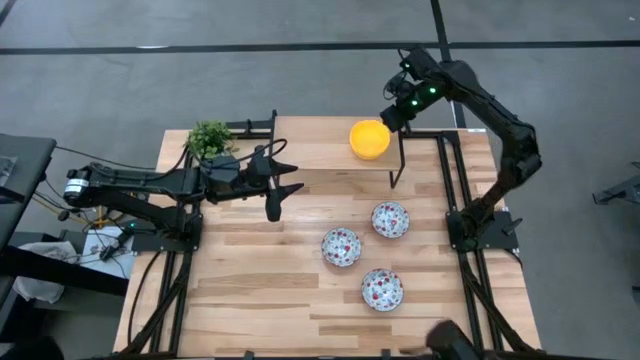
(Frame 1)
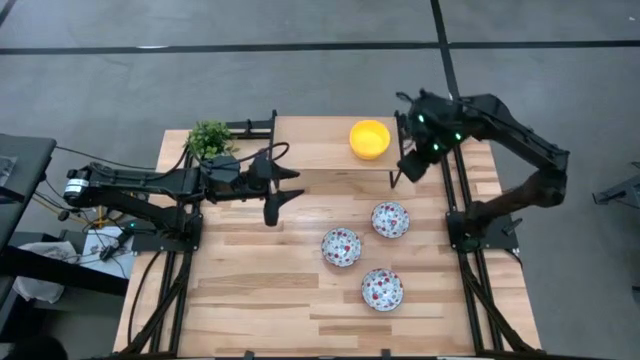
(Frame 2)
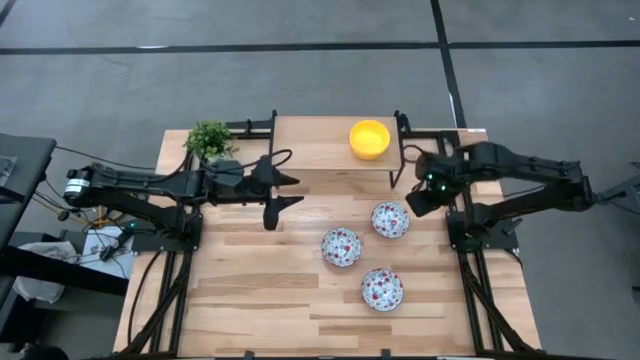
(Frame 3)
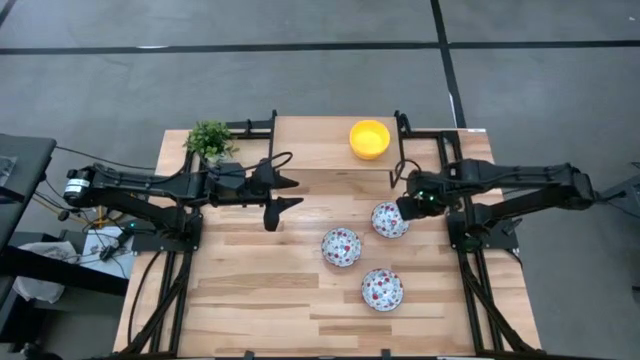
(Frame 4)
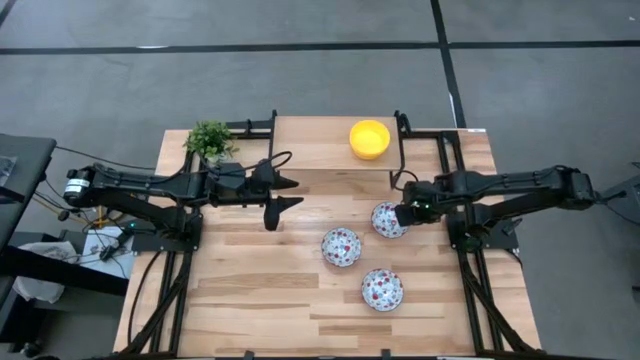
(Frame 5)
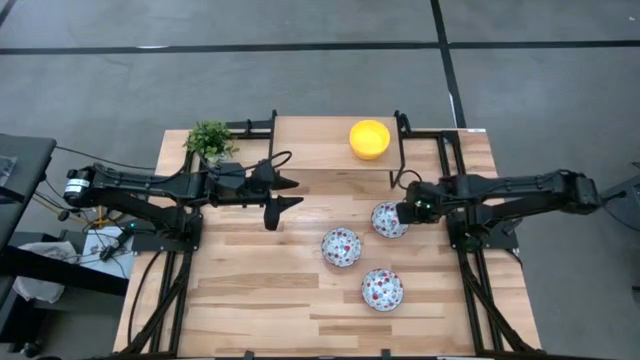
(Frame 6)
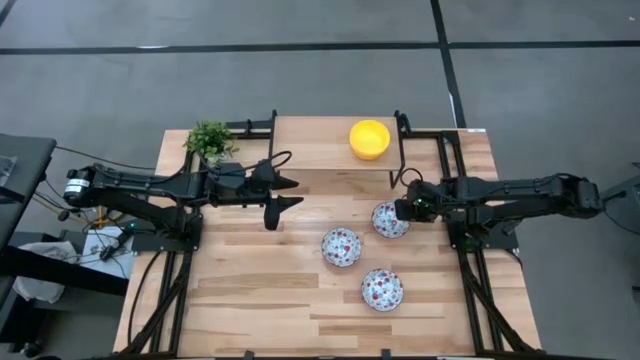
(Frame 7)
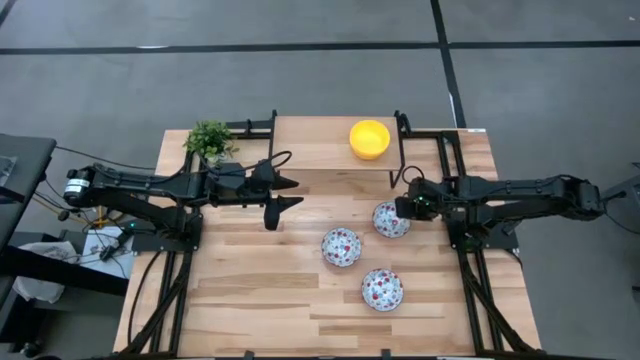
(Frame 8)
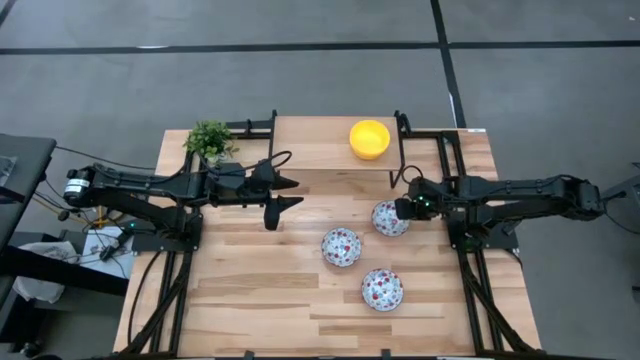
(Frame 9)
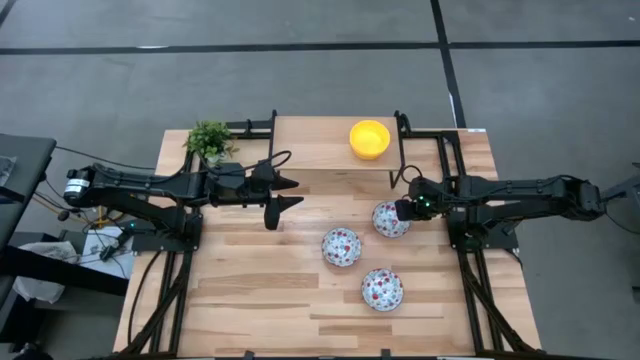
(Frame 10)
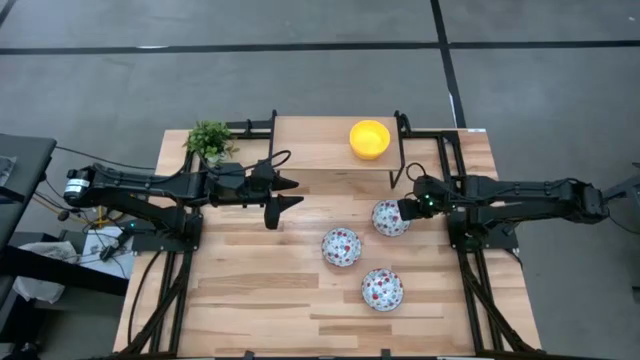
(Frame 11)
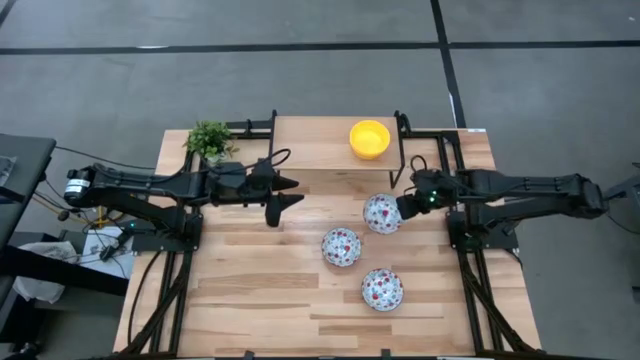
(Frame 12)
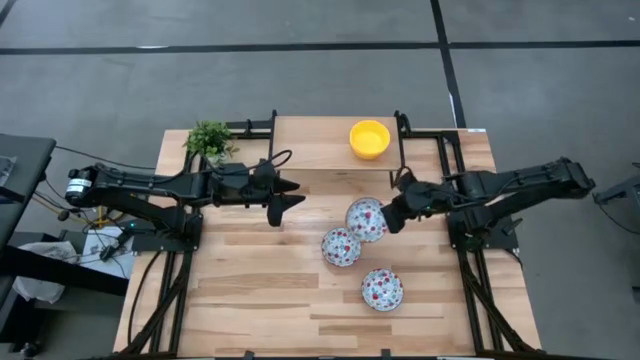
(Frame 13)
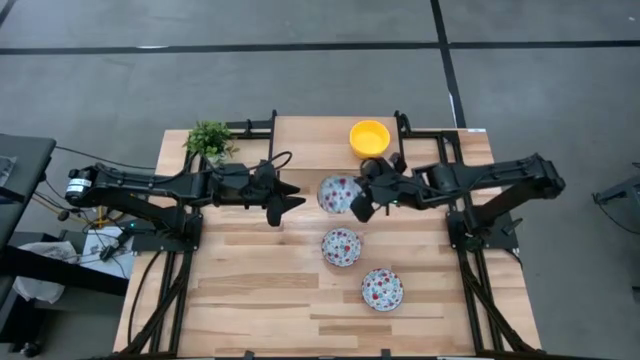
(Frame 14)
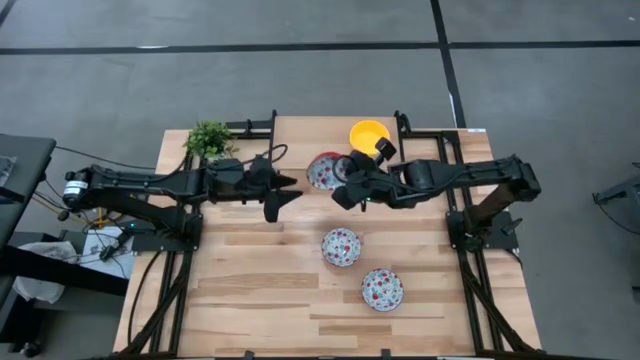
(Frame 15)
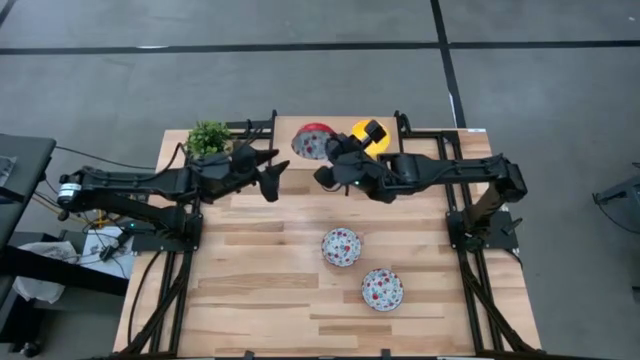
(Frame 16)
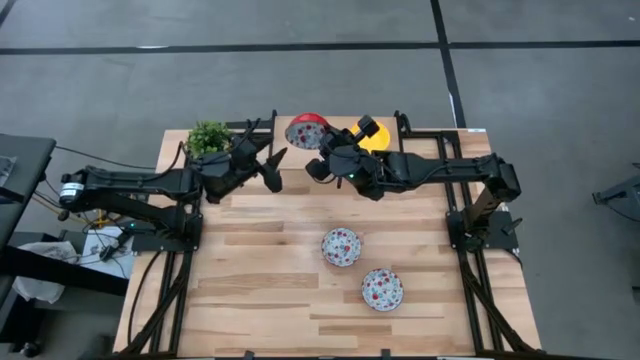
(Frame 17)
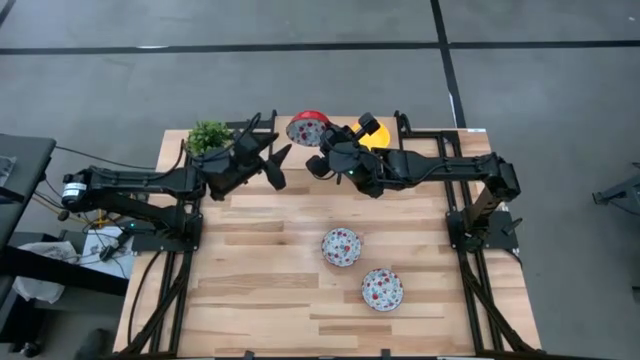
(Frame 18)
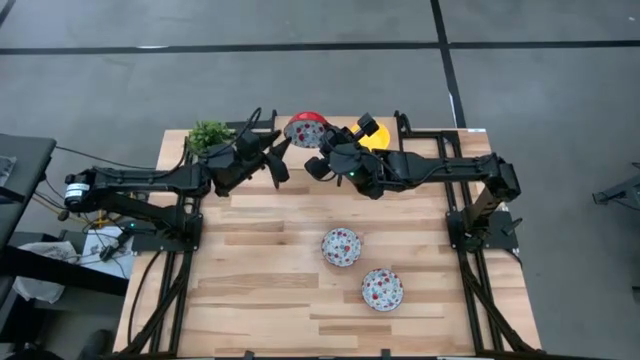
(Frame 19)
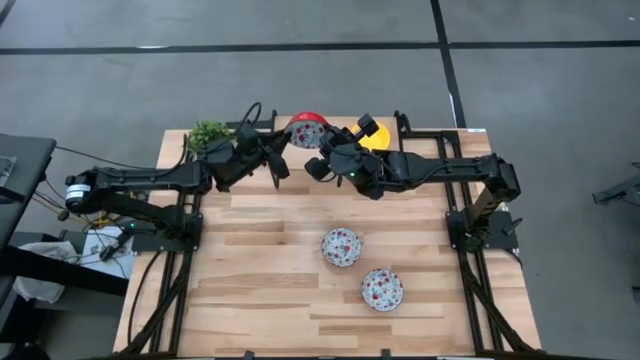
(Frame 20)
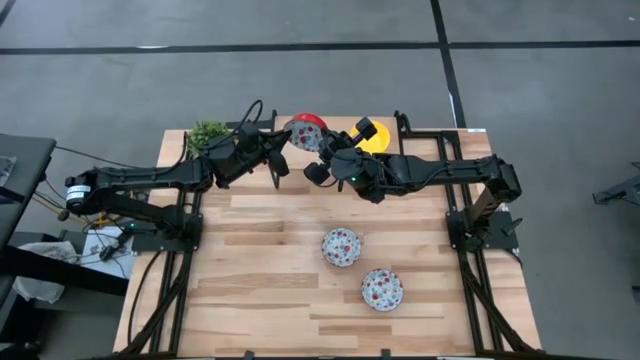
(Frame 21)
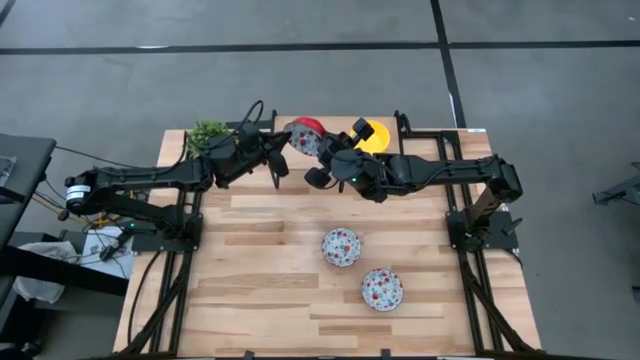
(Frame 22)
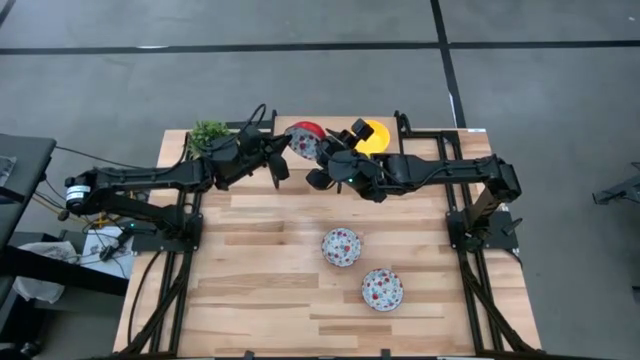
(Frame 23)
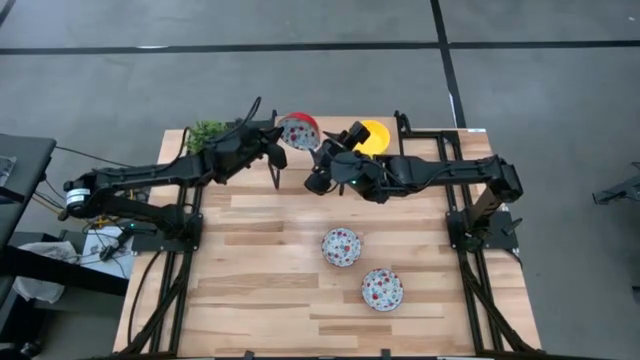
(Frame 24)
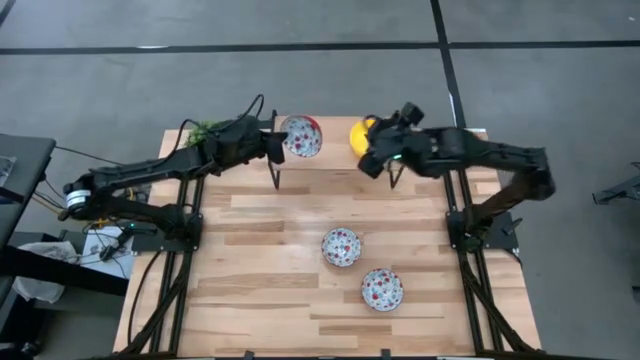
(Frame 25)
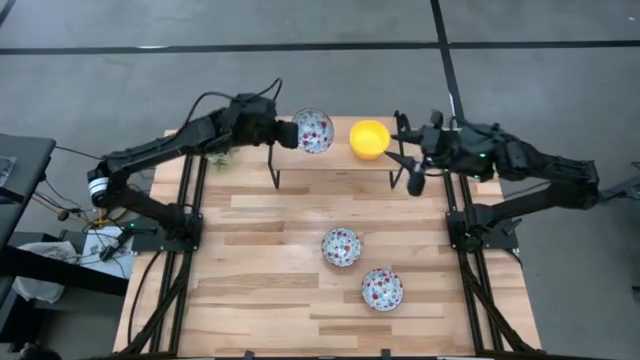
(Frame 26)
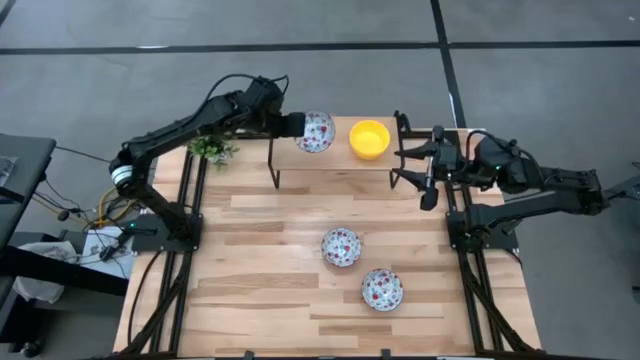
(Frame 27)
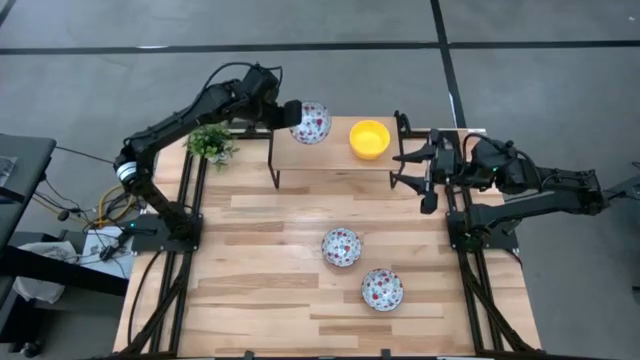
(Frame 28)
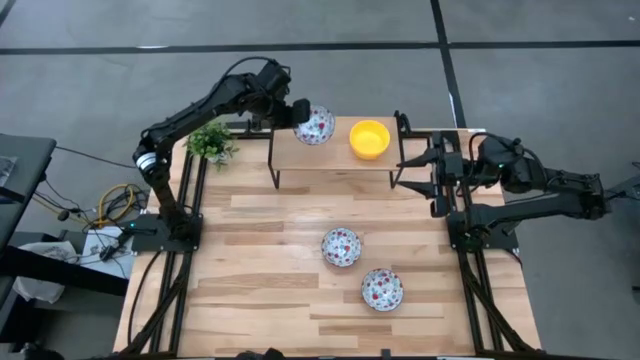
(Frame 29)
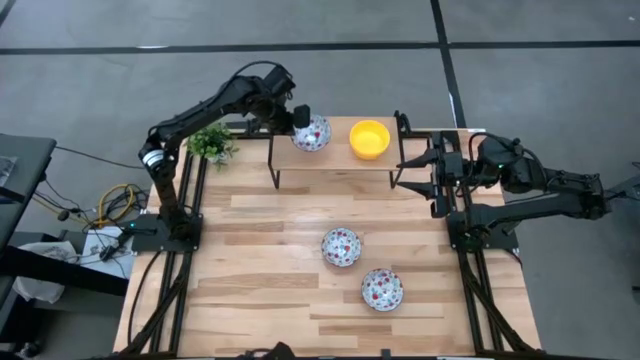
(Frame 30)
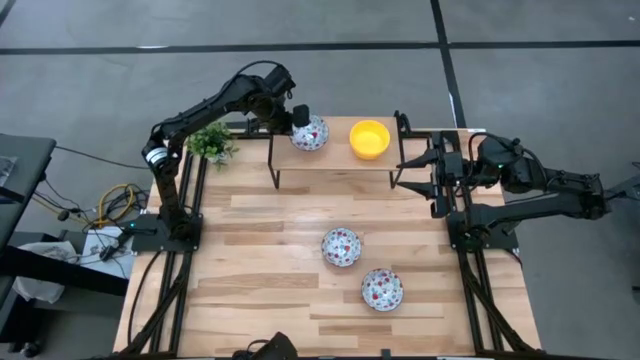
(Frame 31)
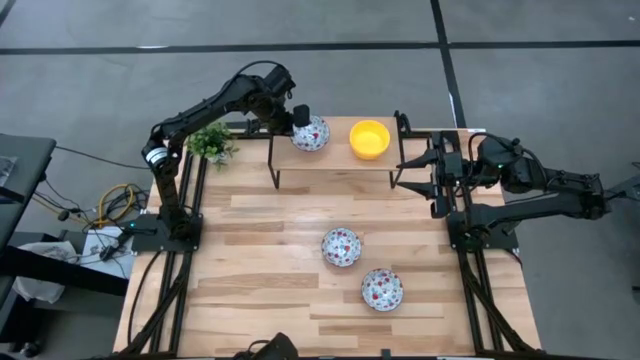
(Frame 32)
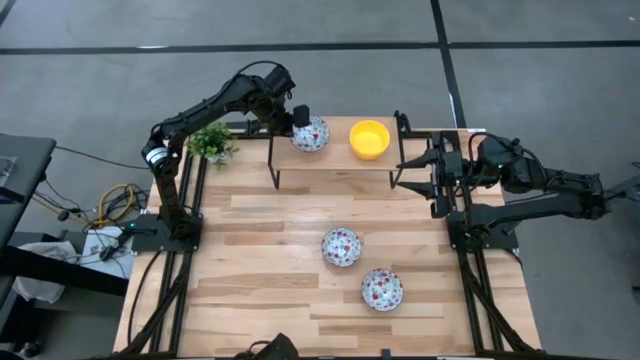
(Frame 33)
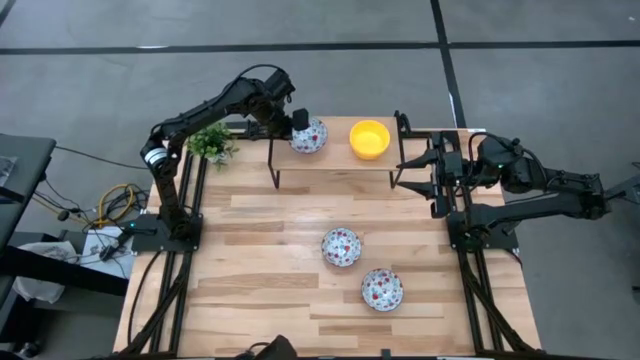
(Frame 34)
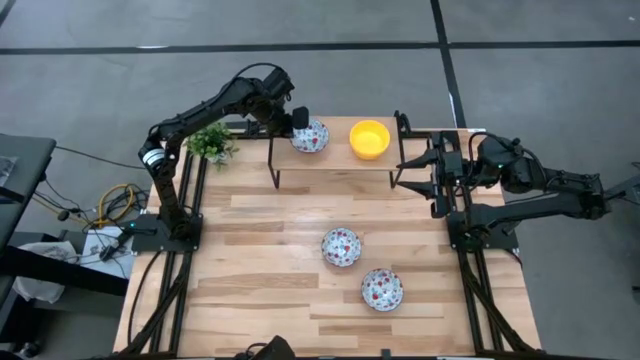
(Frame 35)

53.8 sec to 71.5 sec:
Task: Pick & Place Mini bowls
Put the top orange bowl on the shelf
